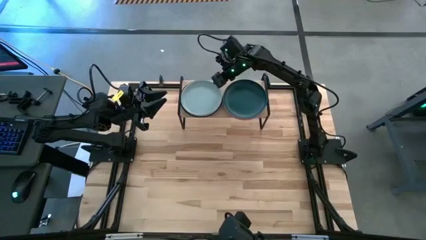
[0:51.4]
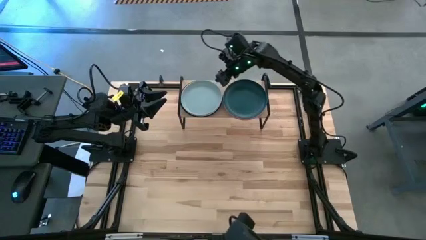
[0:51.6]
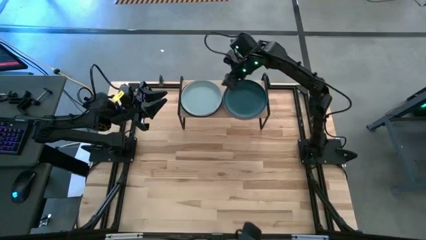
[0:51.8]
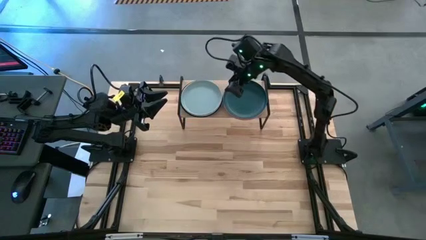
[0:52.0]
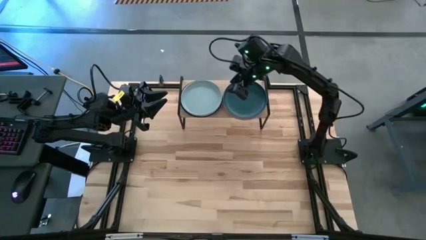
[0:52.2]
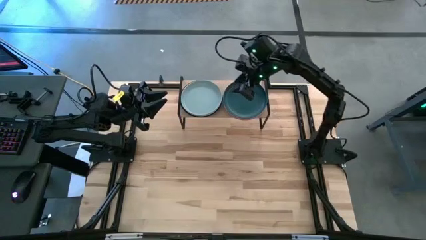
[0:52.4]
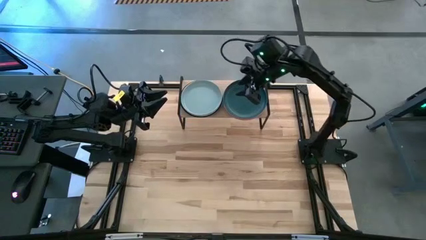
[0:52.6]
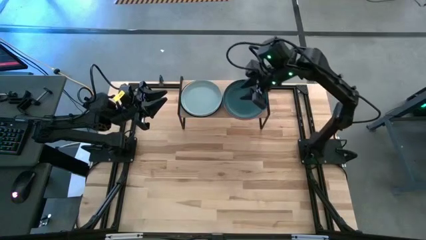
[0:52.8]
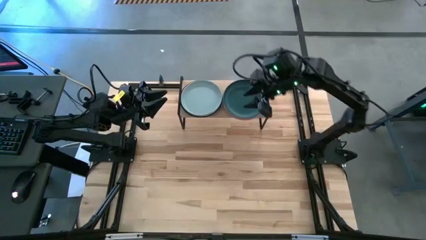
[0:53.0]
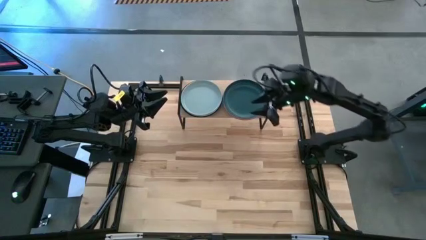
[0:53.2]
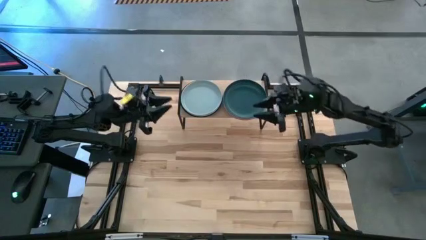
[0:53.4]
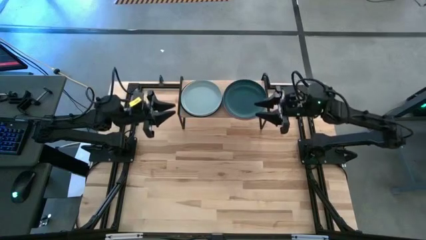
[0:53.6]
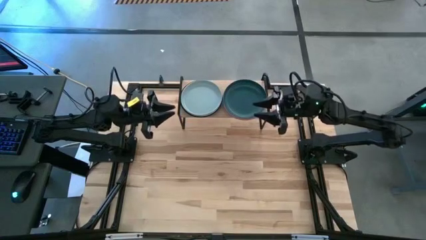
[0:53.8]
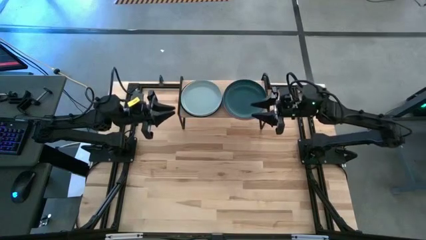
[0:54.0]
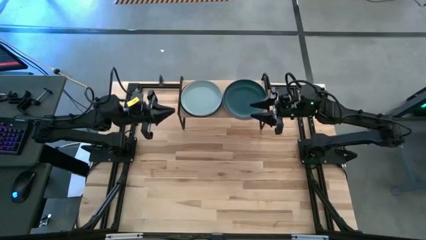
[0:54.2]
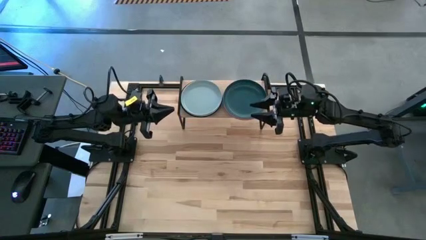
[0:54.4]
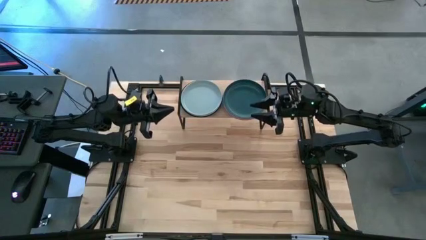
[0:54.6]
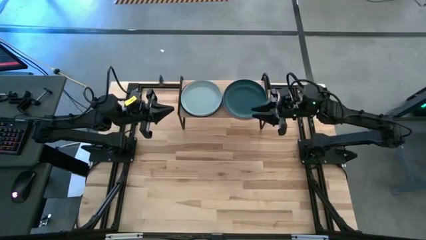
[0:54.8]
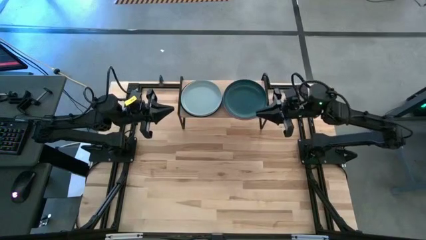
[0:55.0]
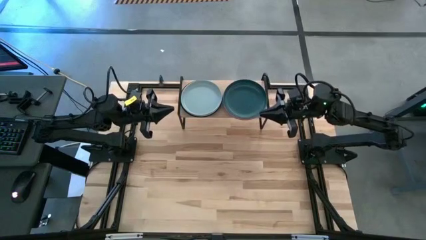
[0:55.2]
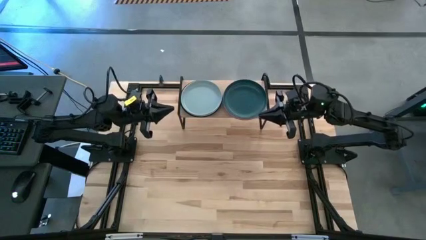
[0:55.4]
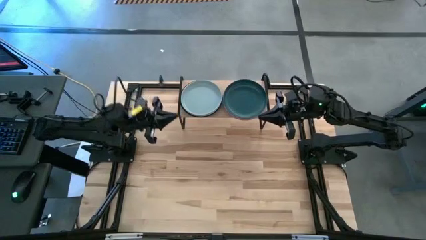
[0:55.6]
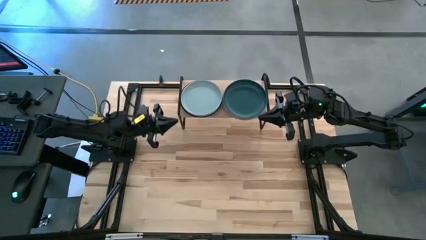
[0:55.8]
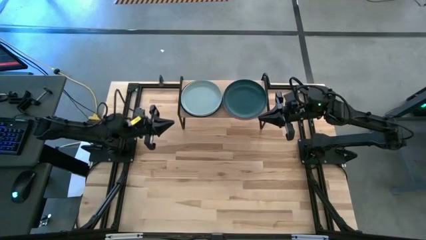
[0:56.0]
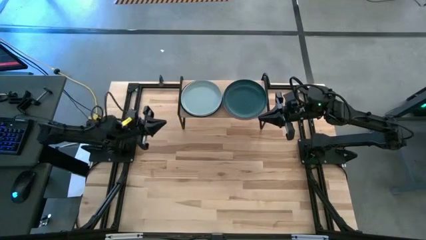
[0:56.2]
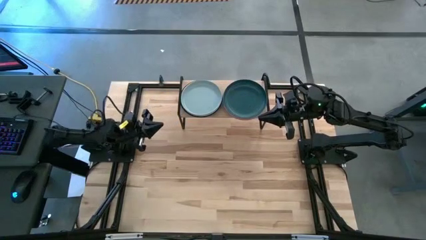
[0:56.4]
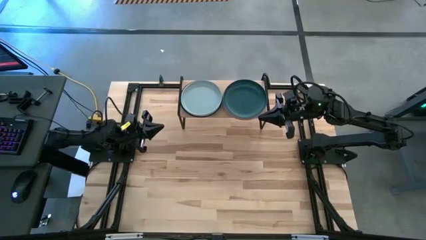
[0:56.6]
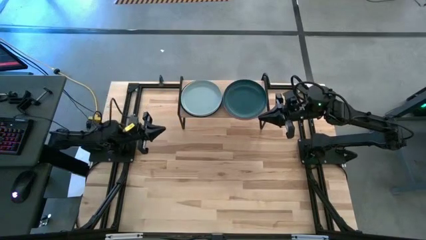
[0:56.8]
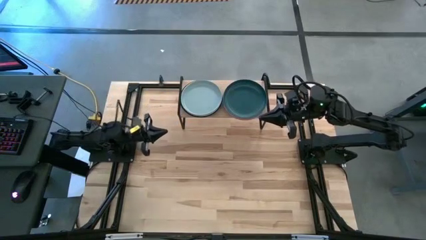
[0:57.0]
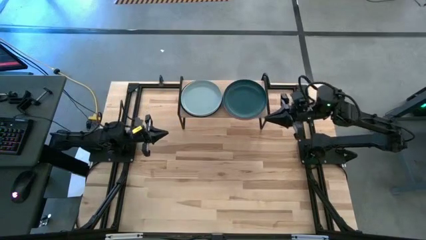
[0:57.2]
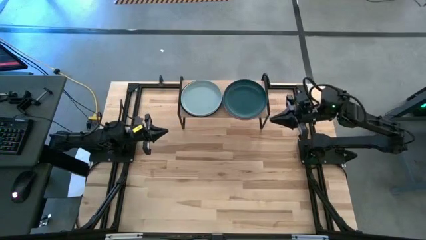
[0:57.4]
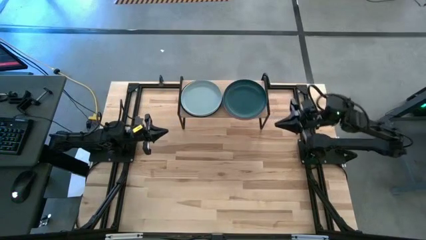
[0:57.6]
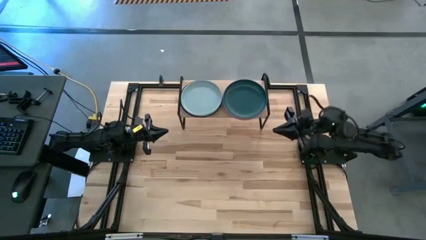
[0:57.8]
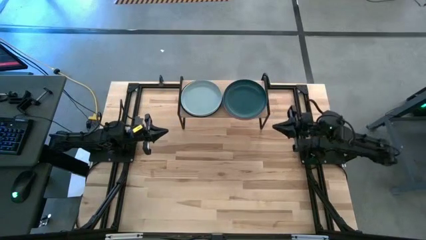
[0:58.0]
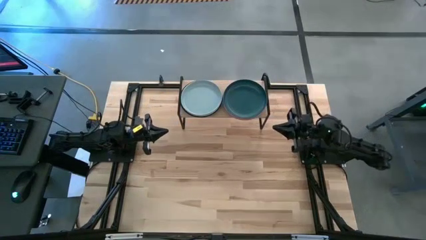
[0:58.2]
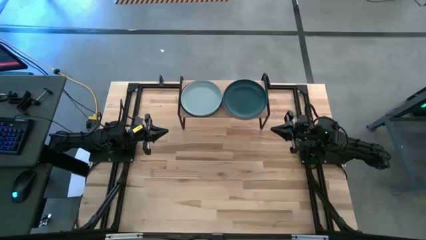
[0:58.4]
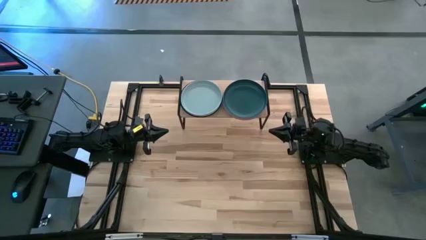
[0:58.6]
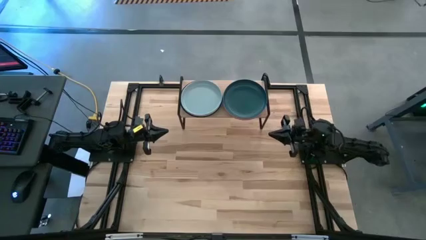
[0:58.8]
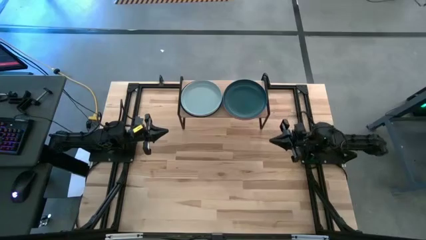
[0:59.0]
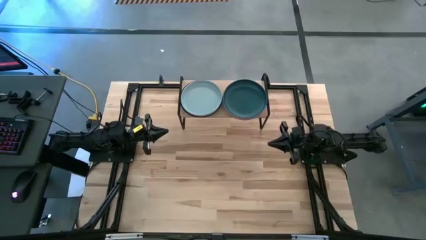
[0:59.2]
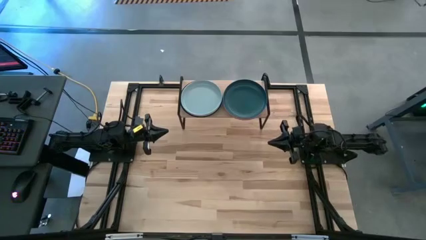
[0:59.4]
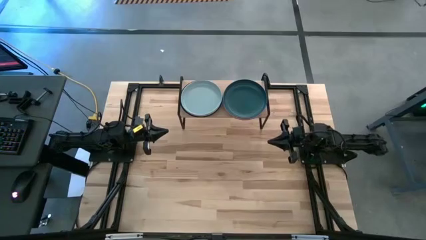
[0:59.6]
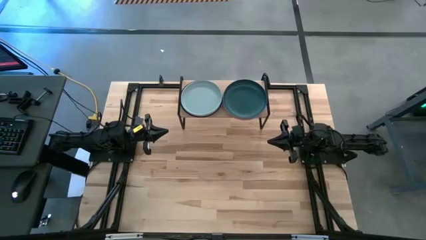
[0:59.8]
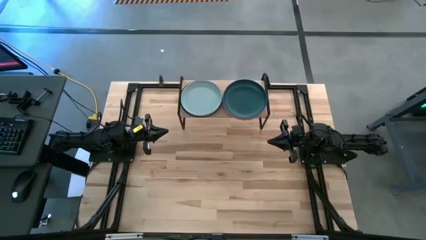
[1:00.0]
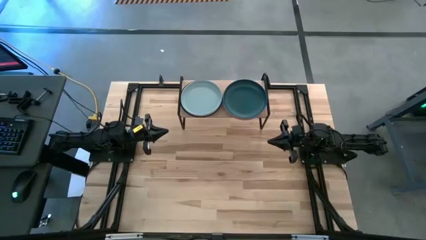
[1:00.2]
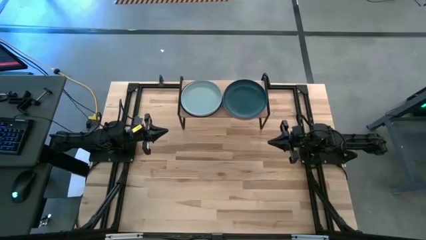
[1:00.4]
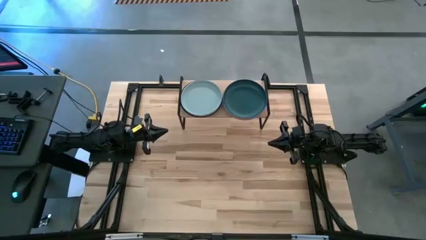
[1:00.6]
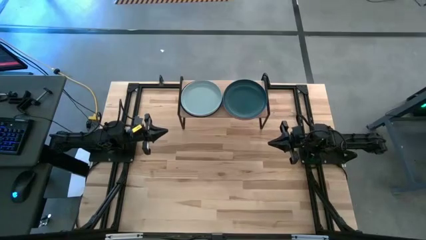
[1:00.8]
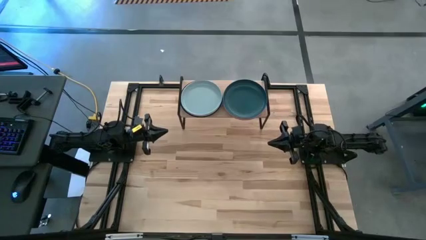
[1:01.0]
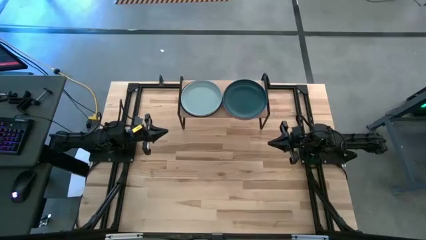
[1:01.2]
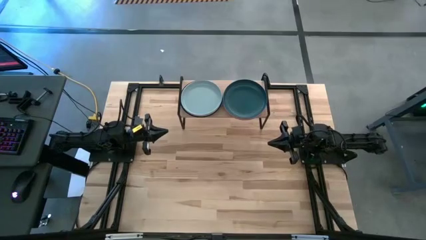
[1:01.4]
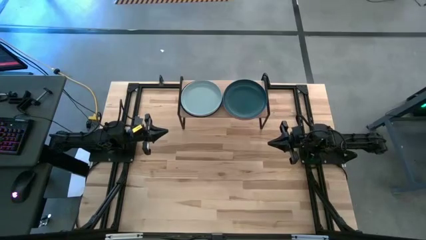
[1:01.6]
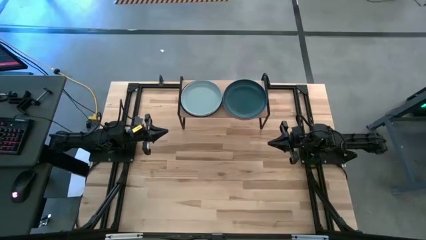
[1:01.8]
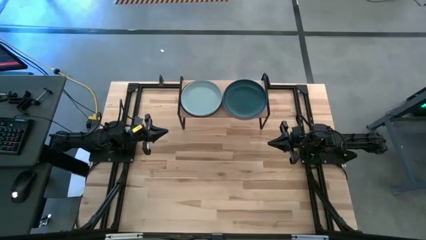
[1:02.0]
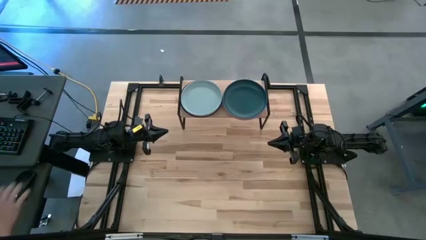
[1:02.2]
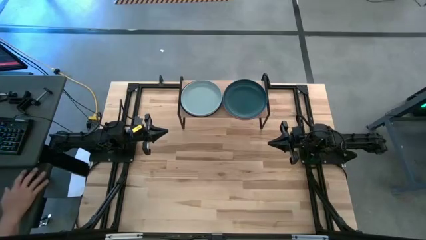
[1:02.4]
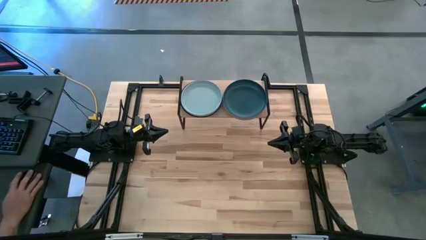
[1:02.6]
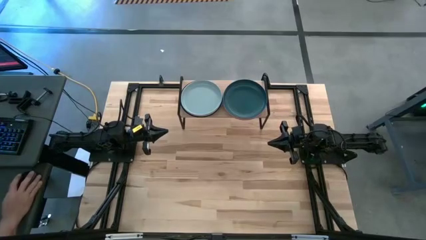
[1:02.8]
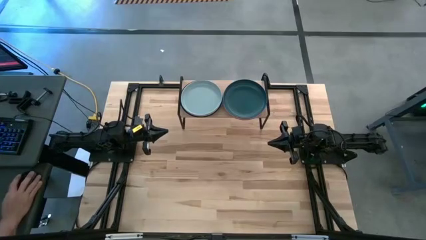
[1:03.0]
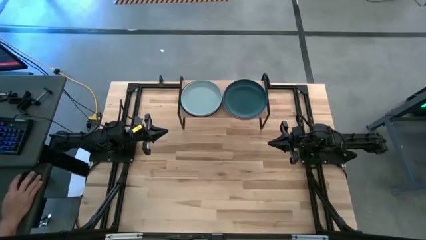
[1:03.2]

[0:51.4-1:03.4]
Task: Place and stack plates onto a shelf
Return to Home Position
